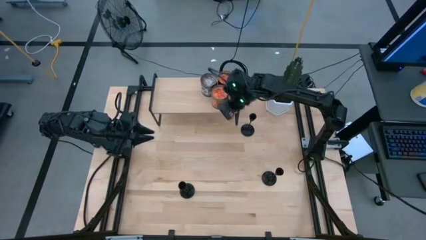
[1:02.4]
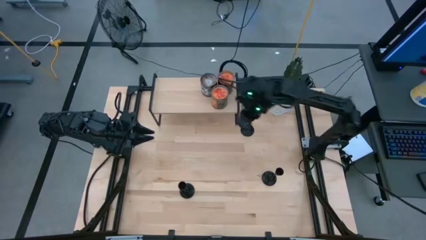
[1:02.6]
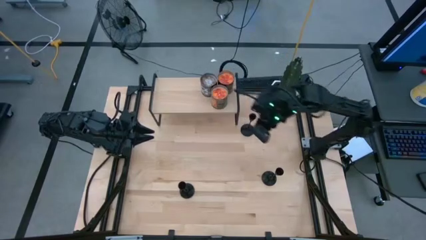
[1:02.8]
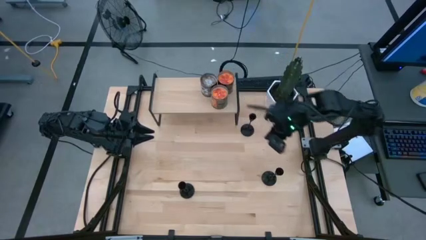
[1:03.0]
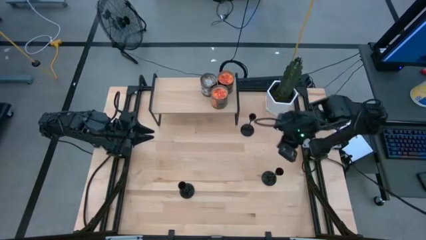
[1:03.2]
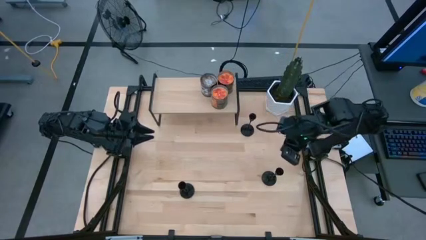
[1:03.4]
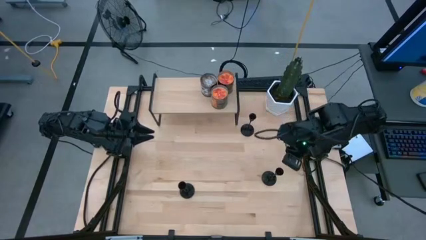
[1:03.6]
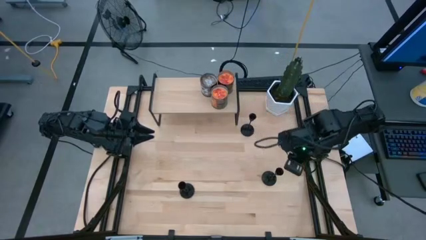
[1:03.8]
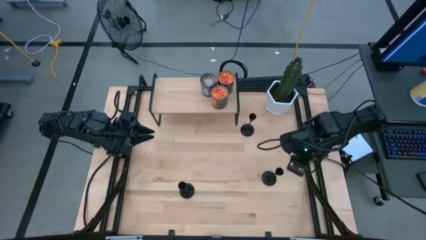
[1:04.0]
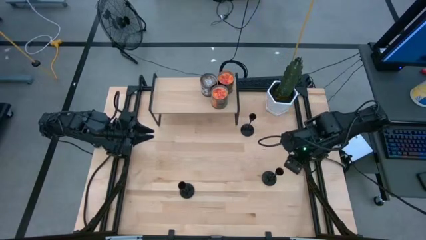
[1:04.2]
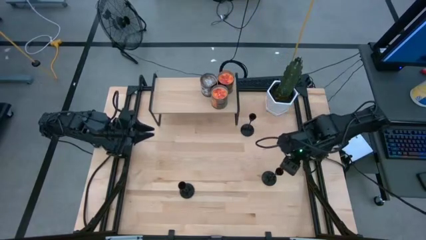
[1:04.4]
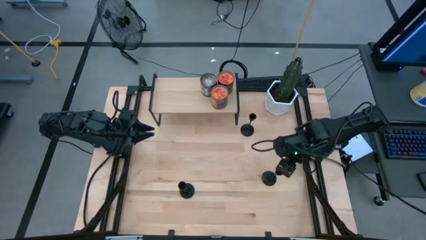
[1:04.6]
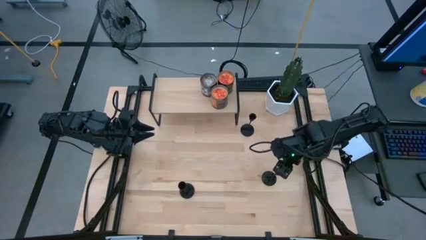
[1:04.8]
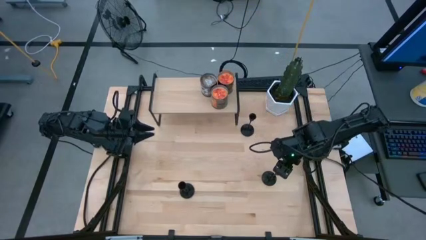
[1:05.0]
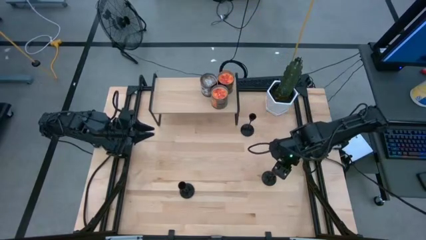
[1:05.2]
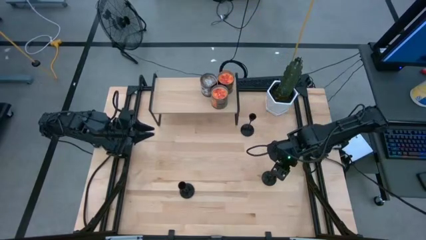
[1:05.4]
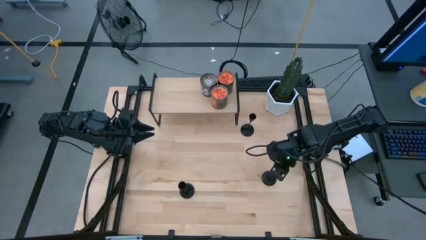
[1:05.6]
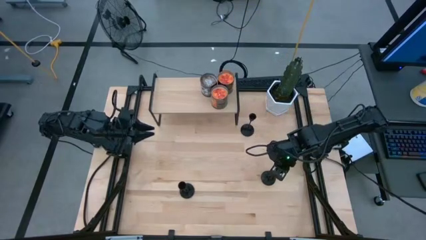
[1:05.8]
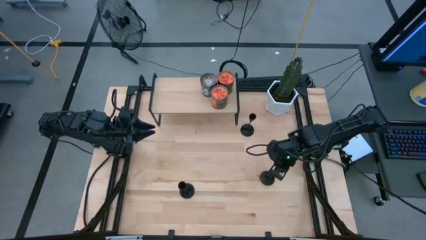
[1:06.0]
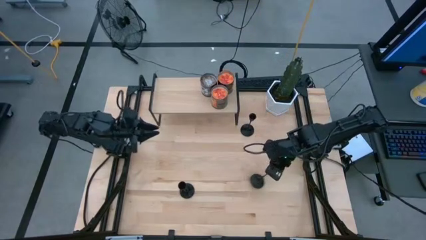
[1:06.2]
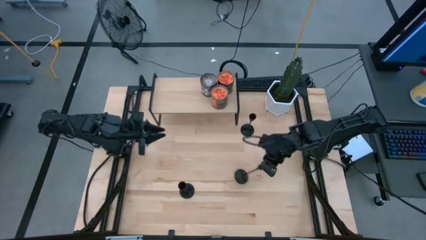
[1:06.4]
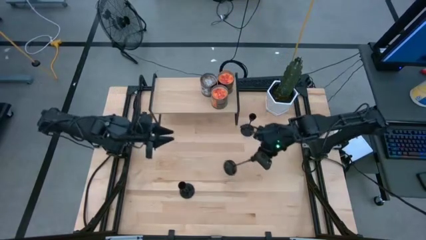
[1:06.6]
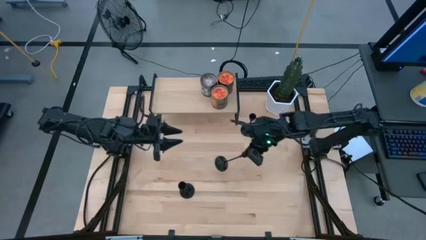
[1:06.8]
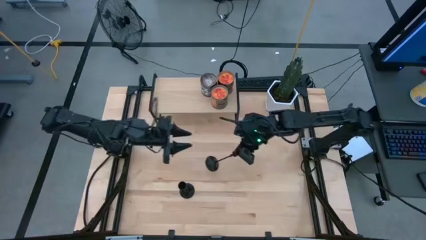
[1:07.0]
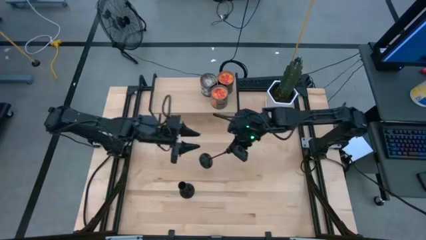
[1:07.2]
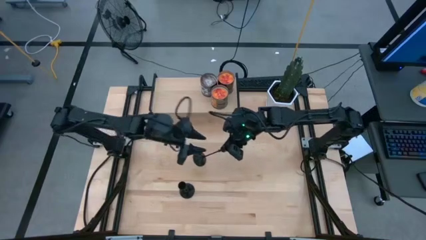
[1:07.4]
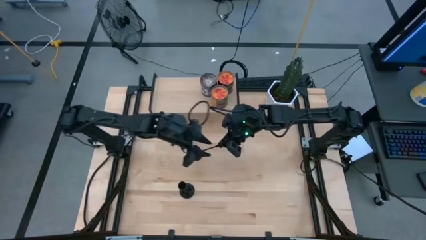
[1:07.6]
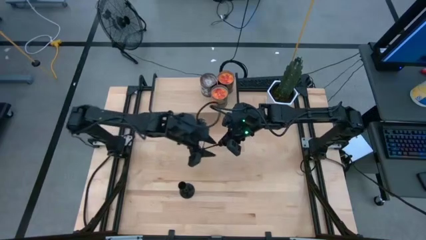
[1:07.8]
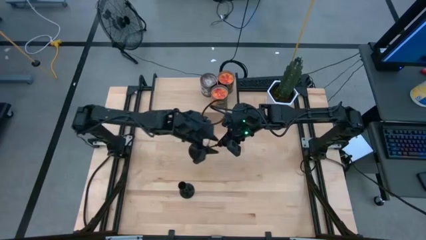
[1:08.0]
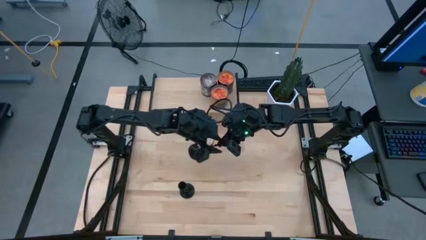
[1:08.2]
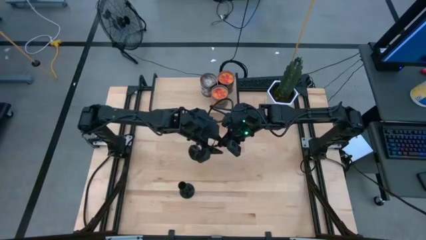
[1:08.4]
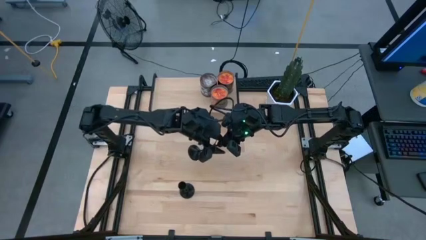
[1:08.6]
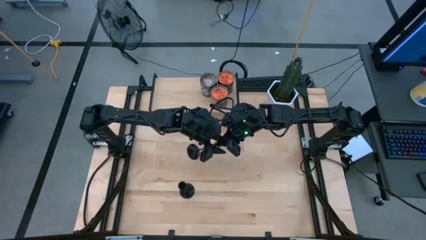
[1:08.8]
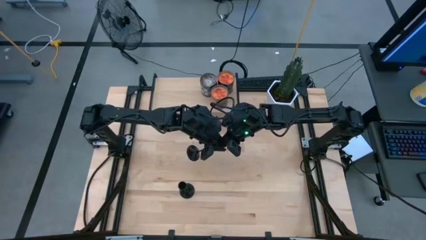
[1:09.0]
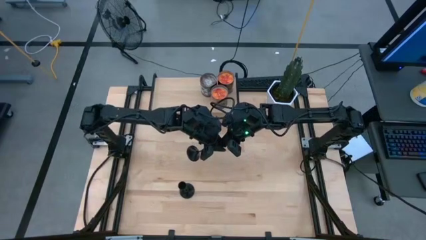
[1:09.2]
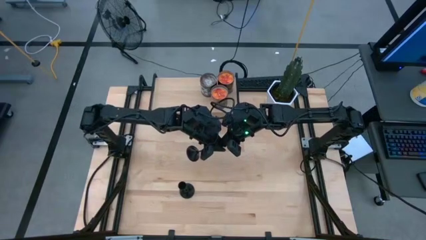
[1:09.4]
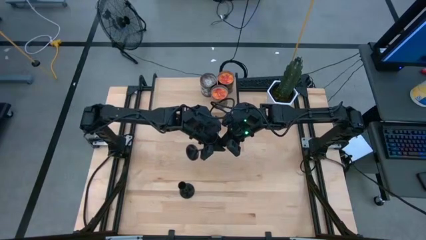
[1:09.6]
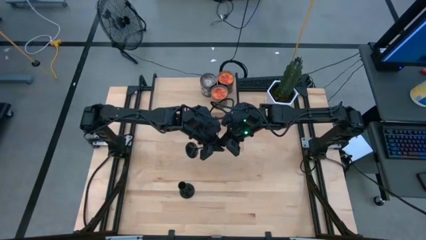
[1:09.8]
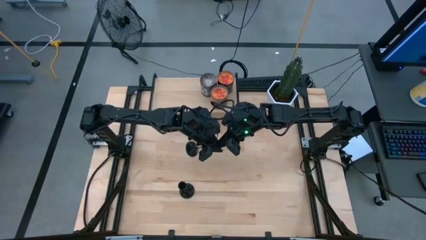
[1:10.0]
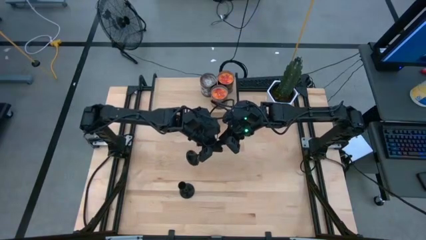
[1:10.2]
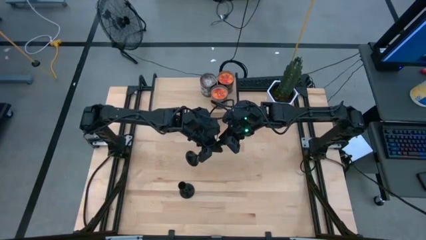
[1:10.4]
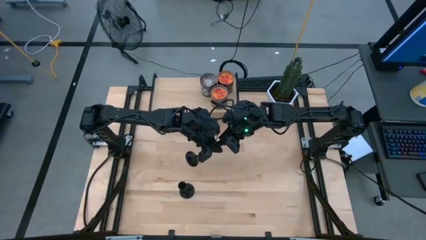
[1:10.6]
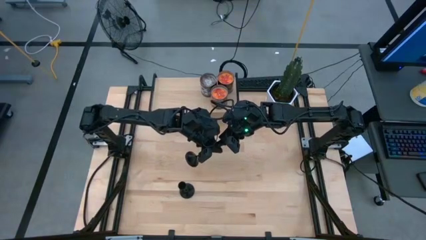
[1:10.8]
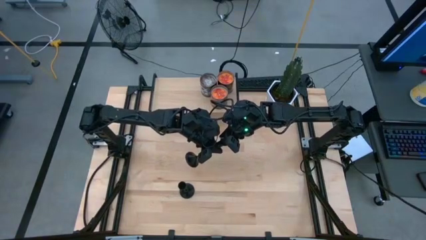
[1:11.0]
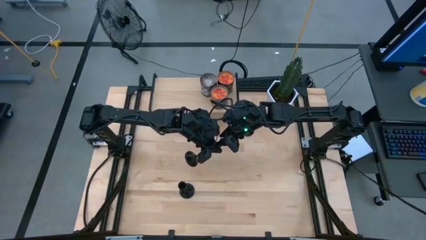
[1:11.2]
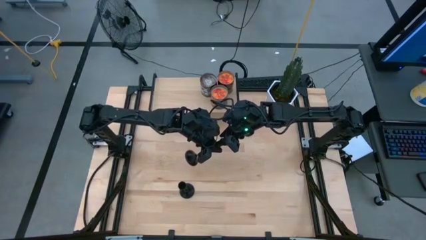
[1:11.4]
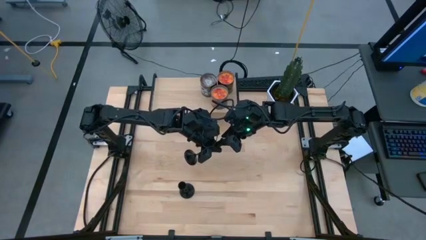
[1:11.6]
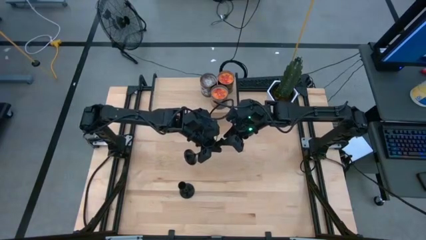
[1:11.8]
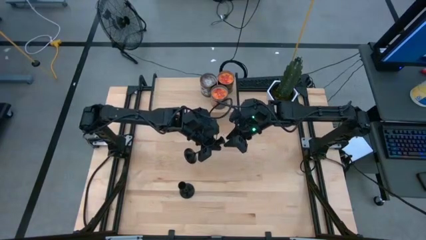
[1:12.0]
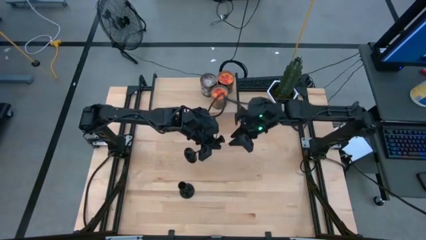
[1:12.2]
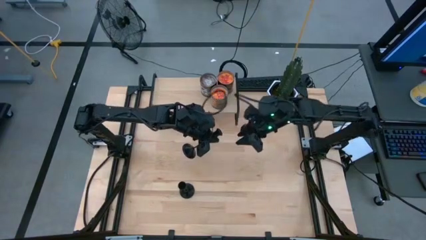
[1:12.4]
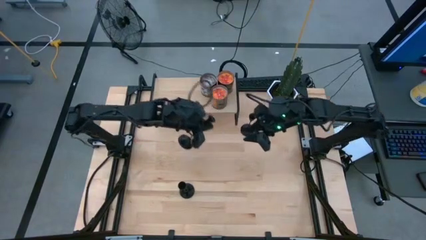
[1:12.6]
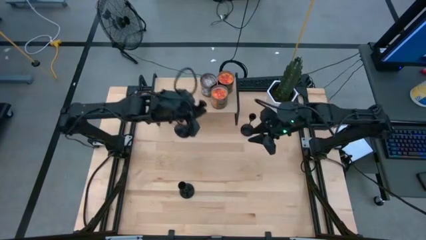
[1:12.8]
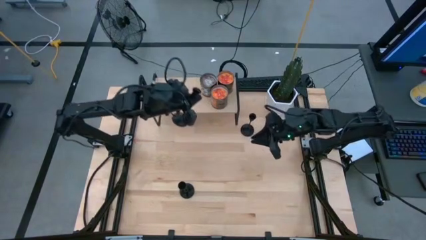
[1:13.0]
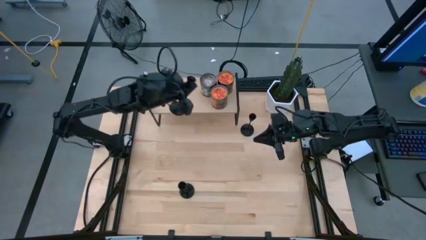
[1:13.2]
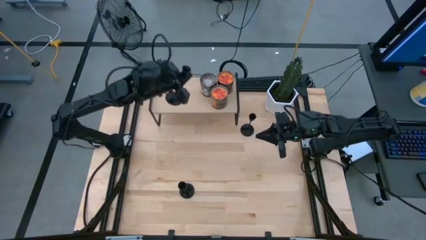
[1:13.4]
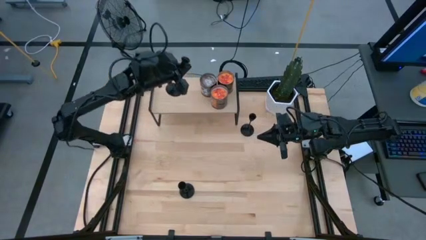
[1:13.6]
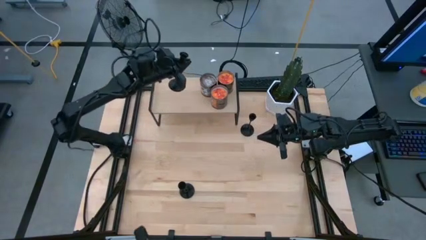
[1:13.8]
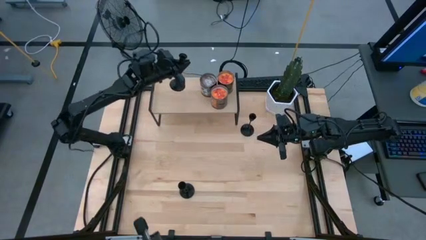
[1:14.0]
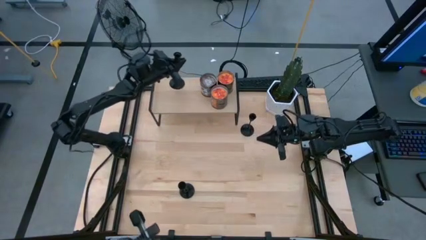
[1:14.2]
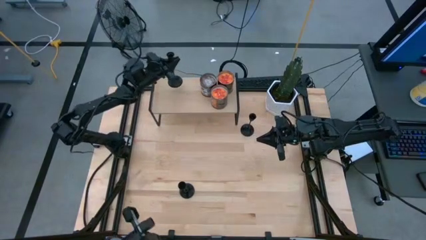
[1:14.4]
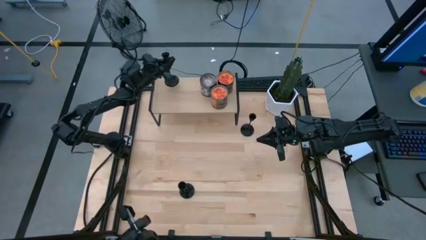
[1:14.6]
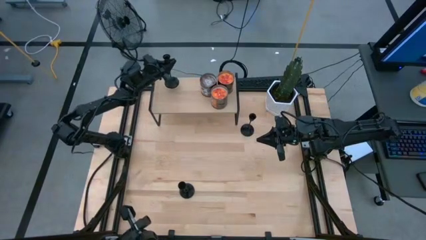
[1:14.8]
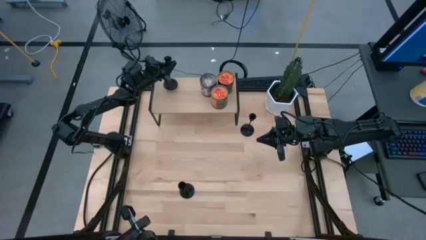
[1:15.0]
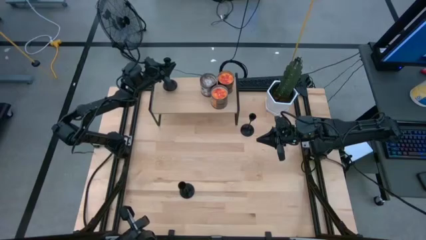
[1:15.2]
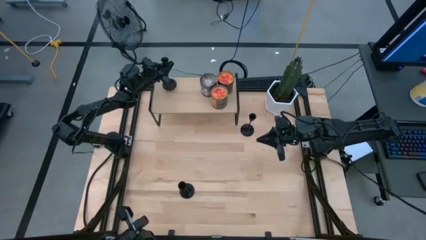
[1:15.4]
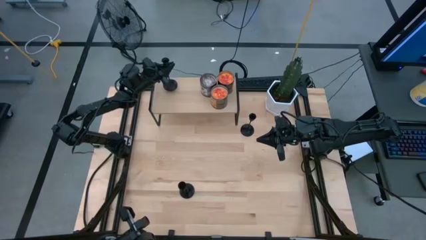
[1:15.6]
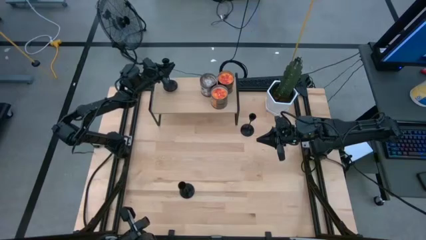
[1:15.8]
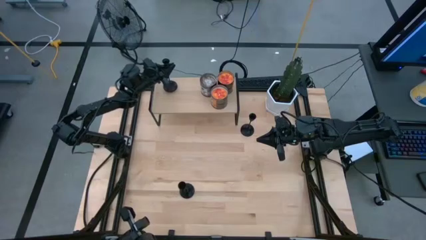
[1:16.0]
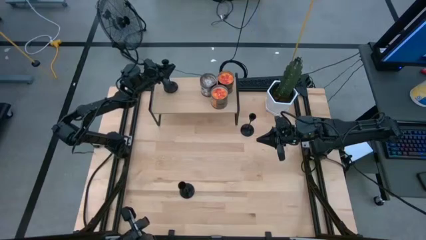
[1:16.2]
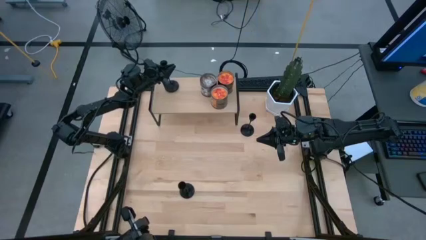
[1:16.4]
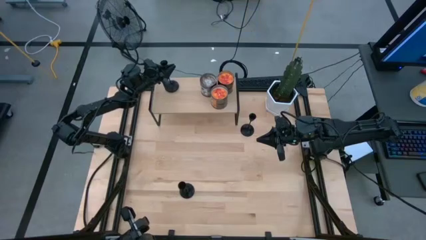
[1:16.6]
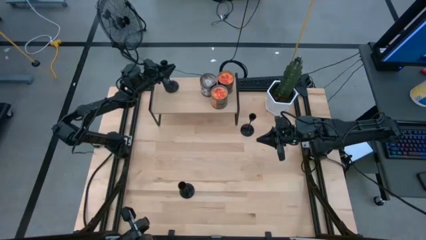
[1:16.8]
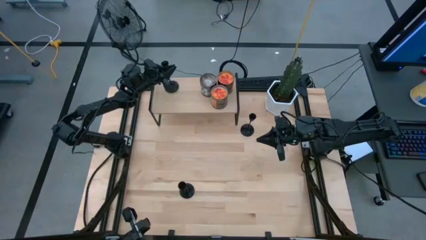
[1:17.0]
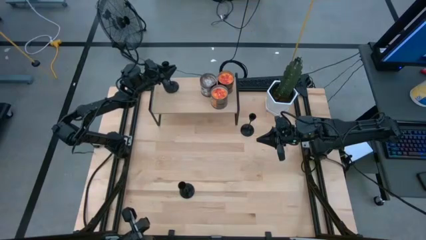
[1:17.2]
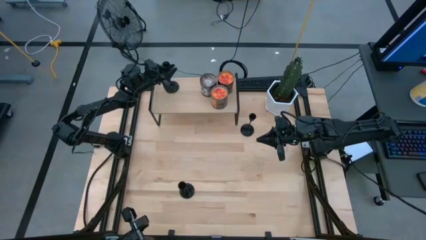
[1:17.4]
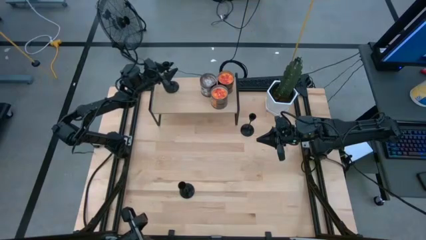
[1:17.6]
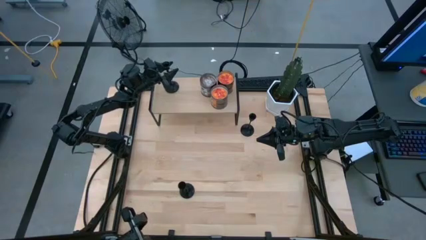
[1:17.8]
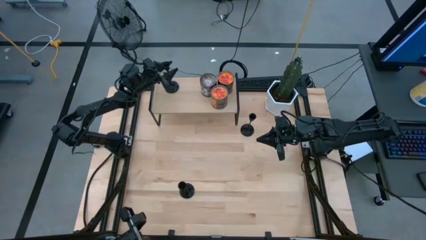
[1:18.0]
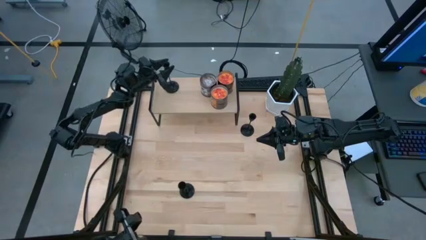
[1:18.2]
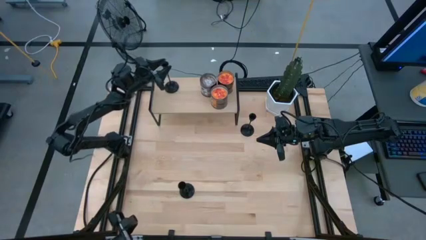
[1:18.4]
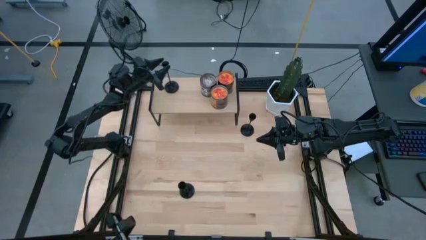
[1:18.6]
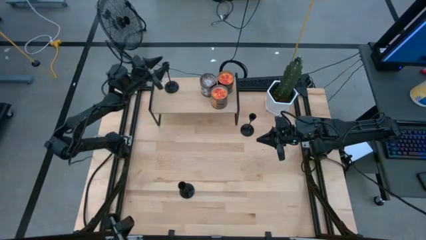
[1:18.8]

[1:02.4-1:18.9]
Task: Pick & Place candle stick holders
Put the bottom right black candle holder on the shelf
